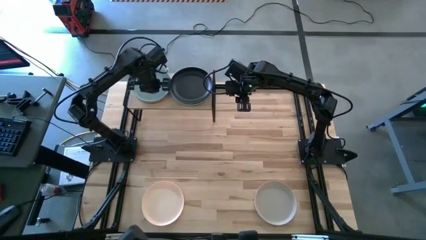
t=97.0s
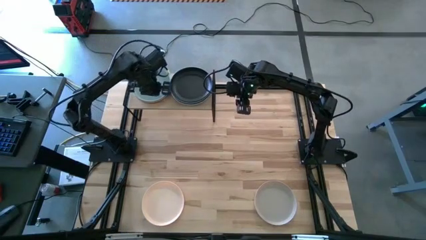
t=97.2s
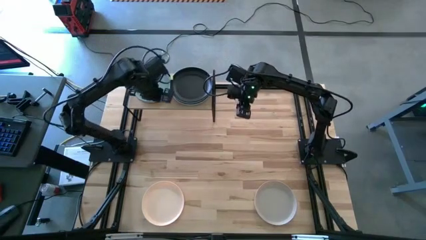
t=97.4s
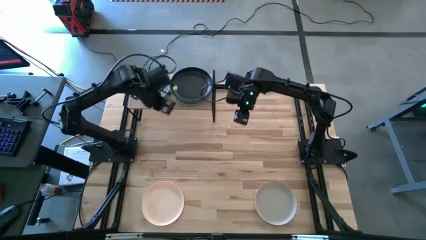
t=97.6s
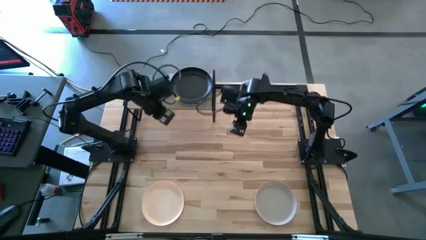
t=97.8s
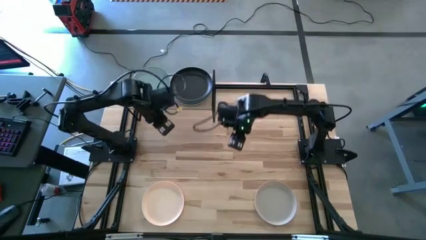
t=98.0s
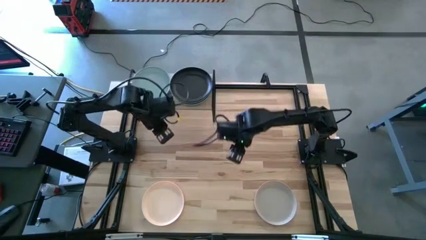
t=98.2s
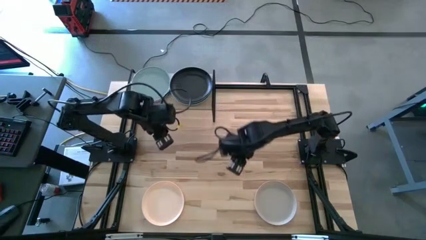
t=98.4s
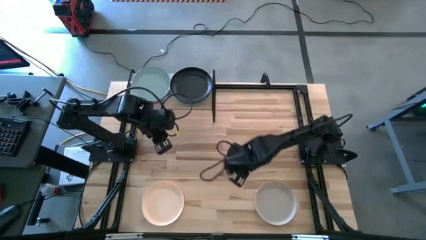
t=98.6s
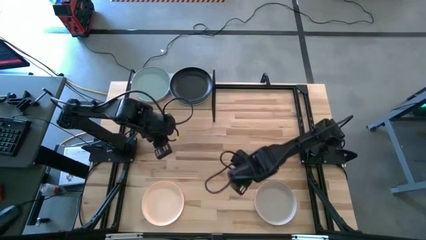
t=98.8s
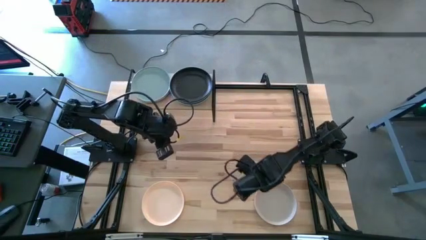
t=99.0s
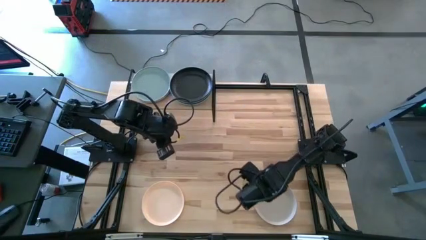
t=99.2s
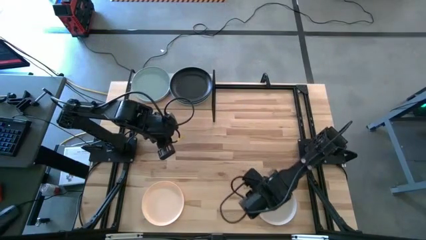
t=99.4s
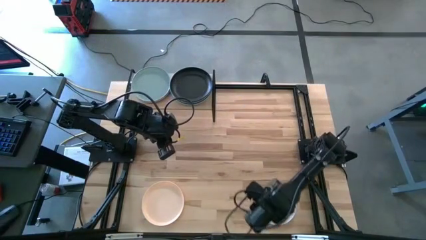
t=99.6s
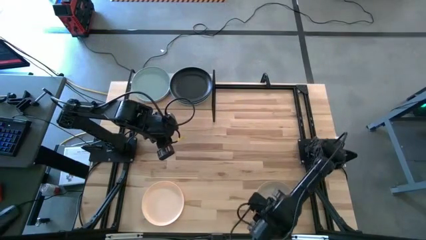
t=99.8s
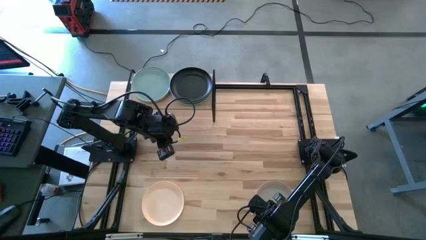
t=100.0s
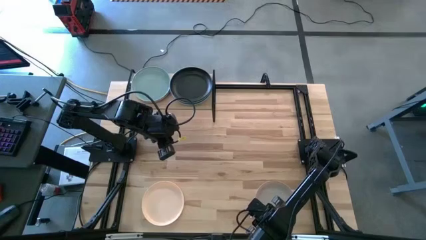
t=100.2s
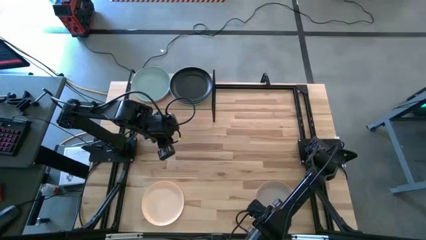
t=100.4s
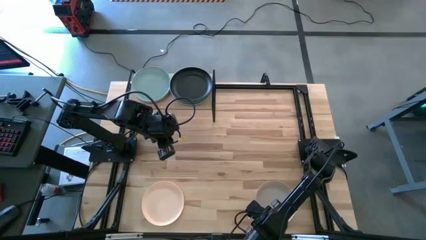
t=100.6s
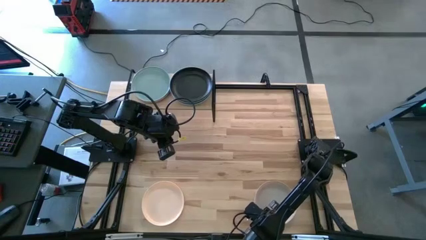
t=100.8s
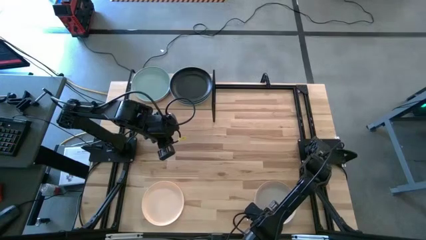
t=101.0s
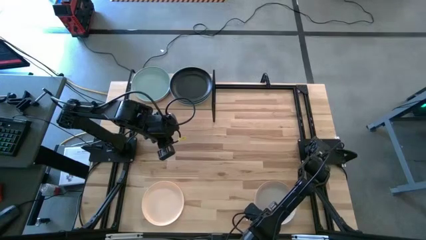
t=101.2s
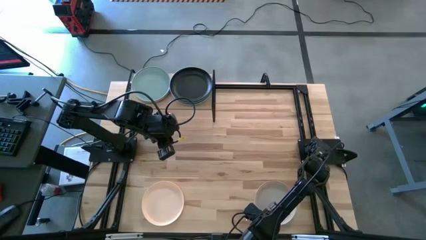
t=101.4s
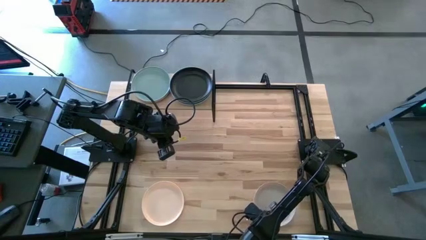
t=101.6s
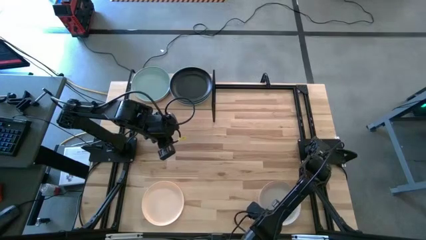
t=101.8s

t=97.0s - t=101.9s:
Task: Place and stack plates onto a shelf
Stack the gray plate on top of the light blue plate on the shelf

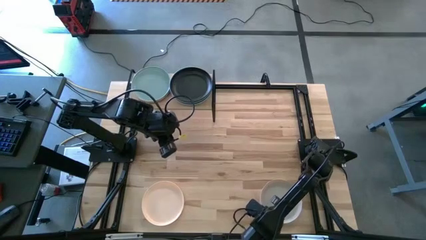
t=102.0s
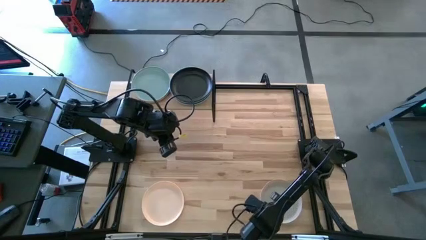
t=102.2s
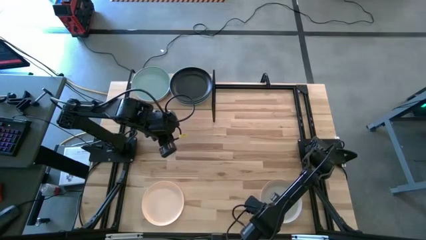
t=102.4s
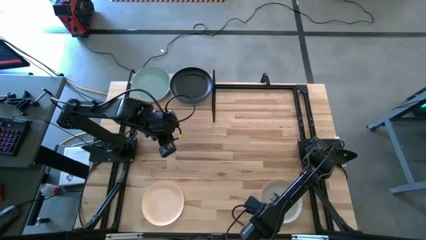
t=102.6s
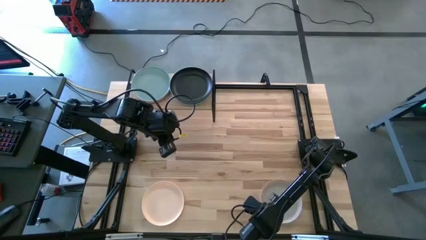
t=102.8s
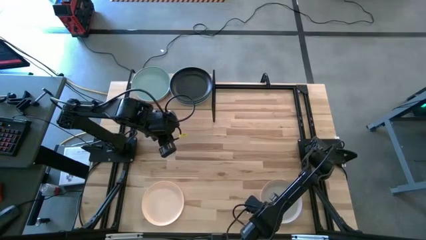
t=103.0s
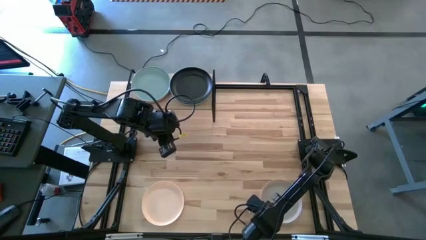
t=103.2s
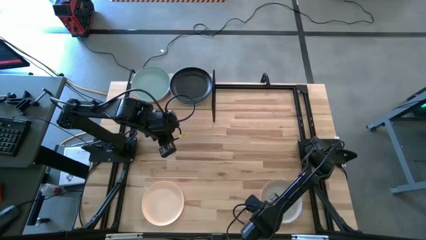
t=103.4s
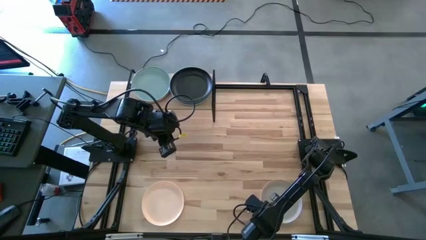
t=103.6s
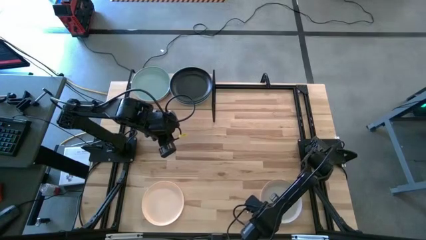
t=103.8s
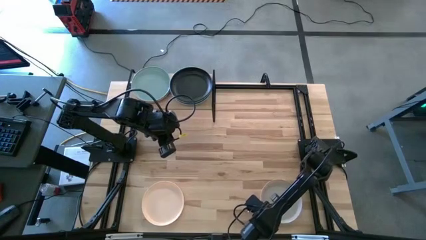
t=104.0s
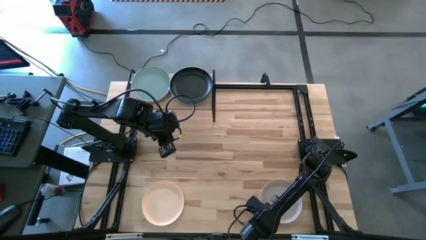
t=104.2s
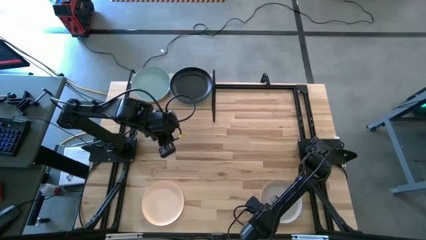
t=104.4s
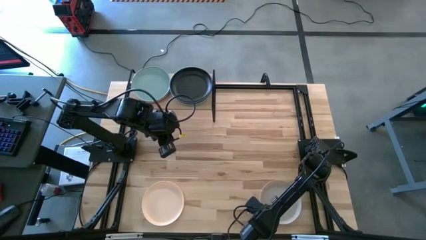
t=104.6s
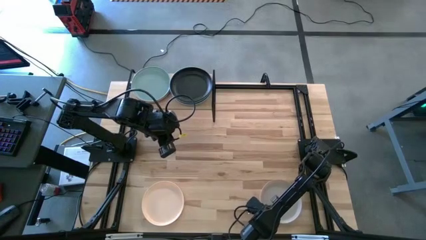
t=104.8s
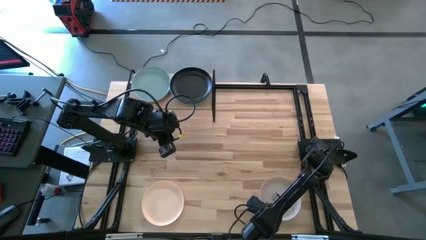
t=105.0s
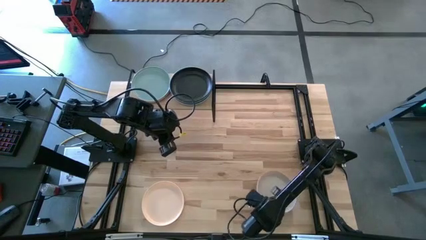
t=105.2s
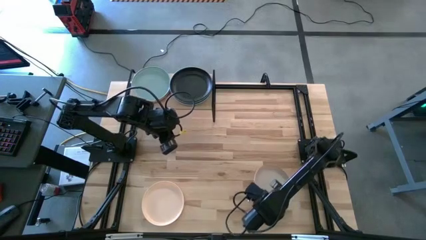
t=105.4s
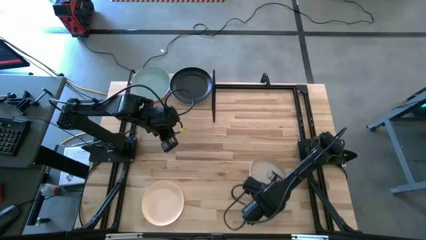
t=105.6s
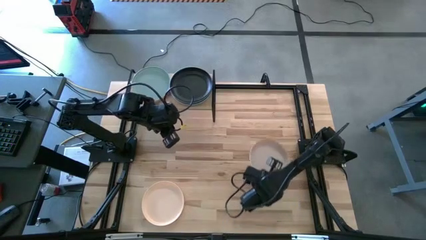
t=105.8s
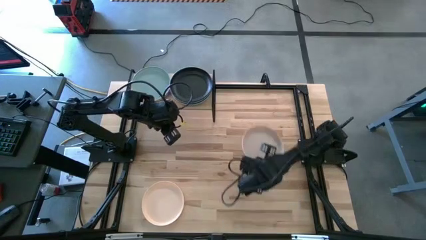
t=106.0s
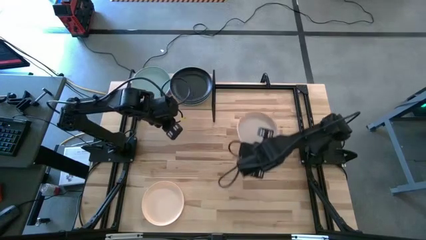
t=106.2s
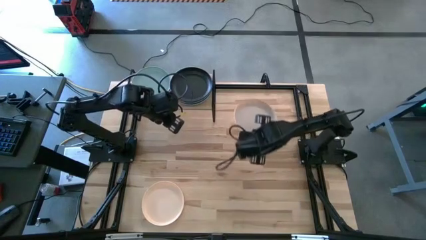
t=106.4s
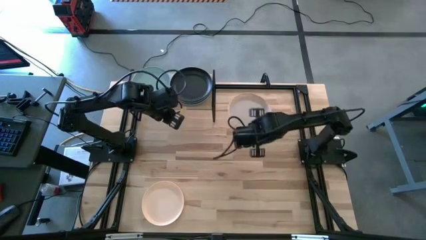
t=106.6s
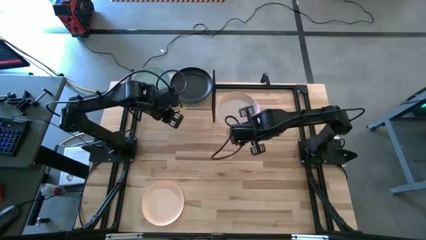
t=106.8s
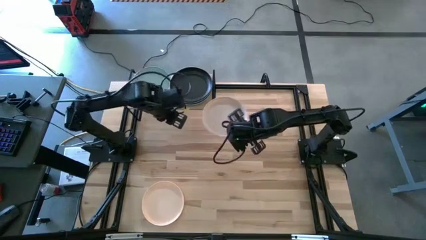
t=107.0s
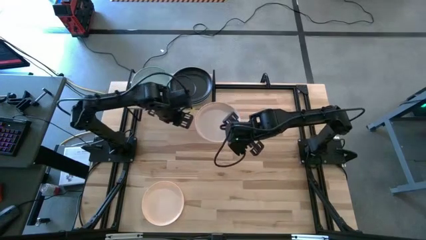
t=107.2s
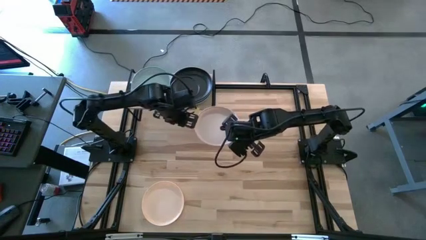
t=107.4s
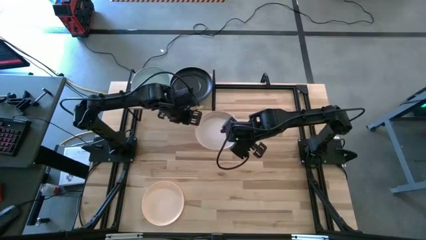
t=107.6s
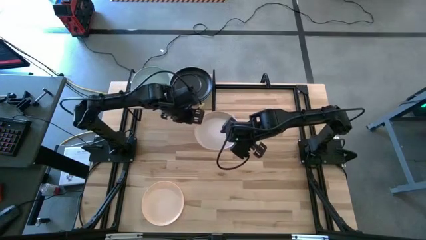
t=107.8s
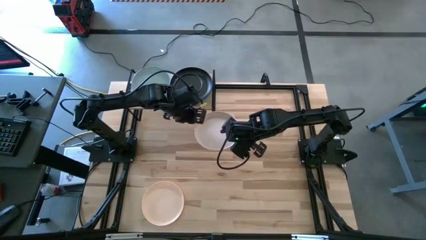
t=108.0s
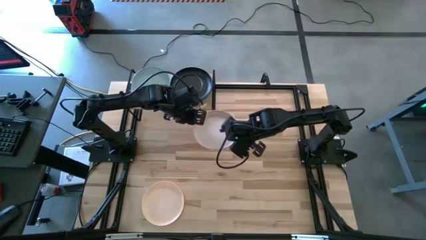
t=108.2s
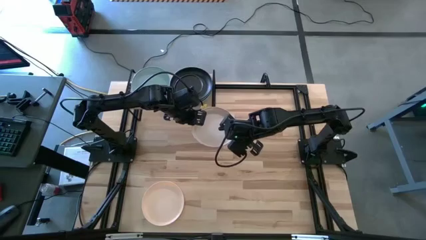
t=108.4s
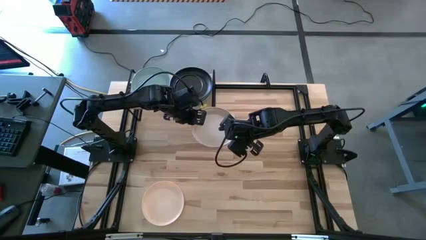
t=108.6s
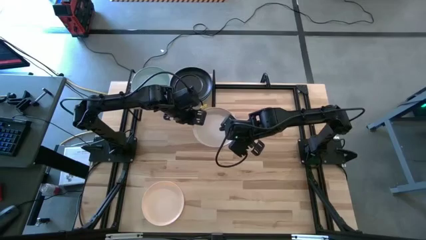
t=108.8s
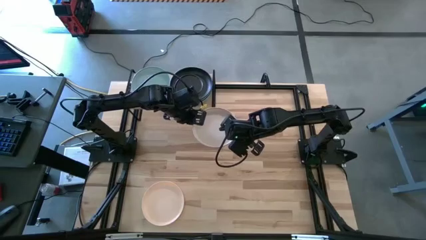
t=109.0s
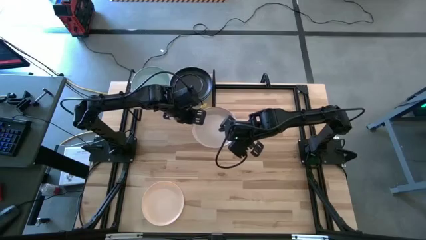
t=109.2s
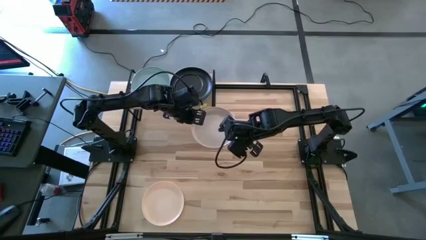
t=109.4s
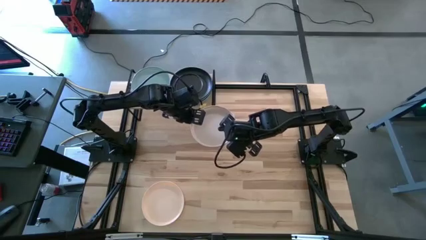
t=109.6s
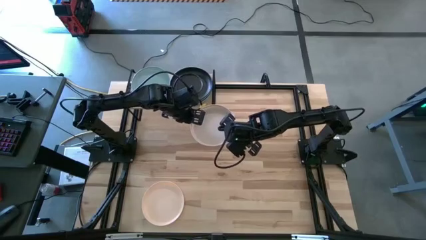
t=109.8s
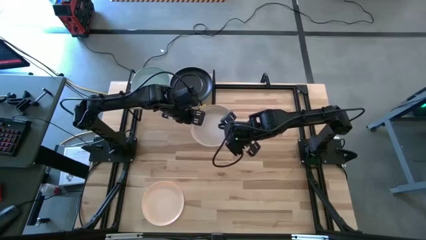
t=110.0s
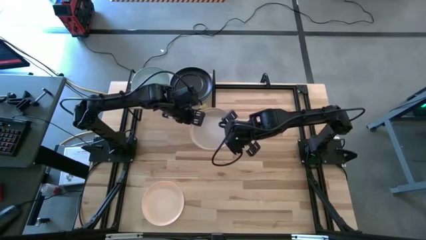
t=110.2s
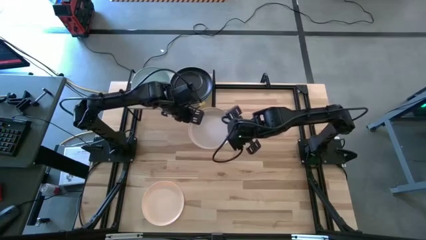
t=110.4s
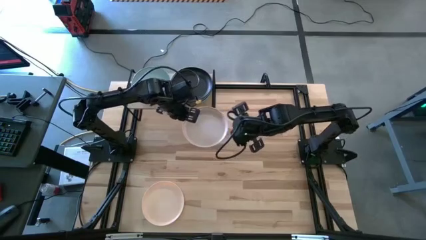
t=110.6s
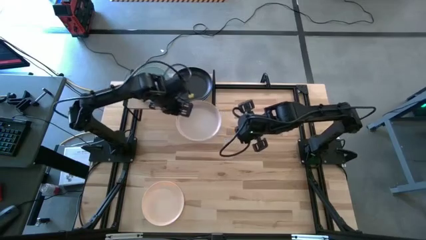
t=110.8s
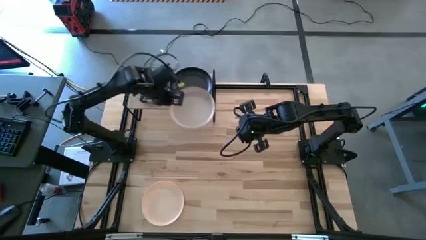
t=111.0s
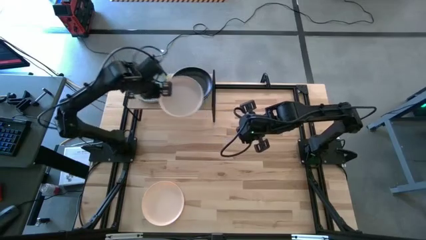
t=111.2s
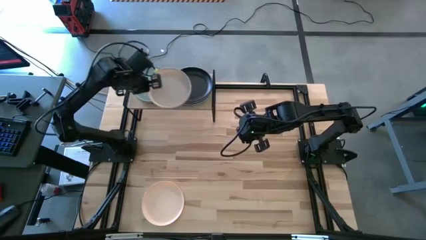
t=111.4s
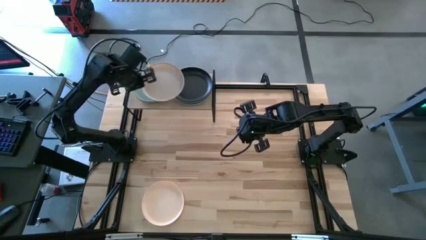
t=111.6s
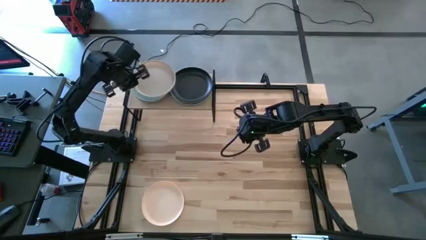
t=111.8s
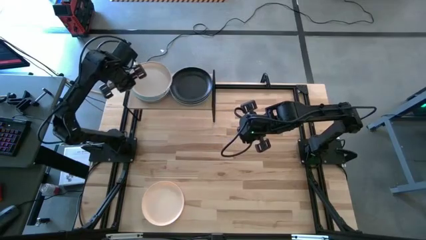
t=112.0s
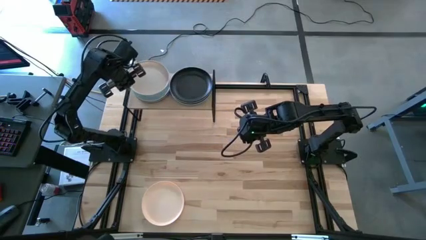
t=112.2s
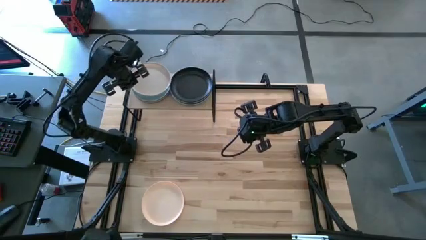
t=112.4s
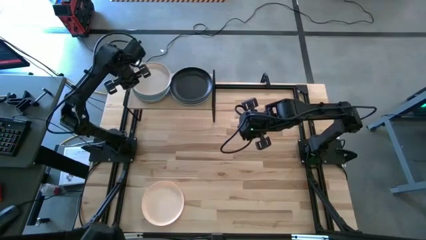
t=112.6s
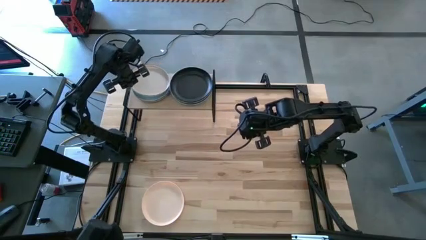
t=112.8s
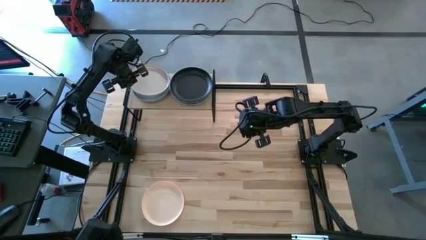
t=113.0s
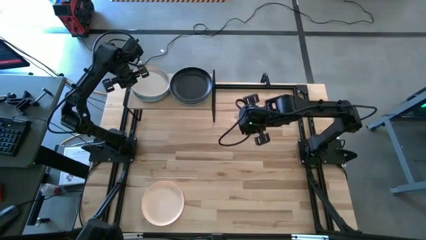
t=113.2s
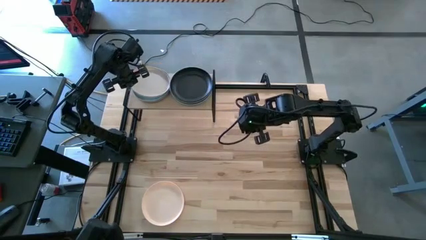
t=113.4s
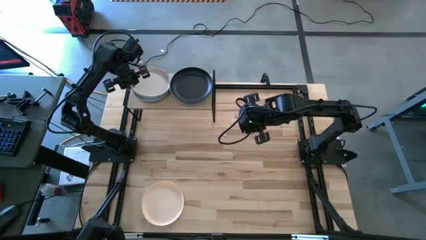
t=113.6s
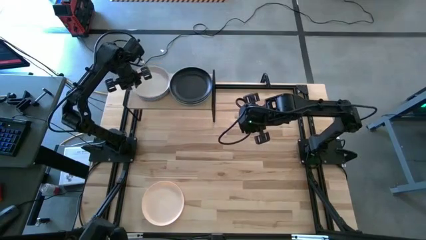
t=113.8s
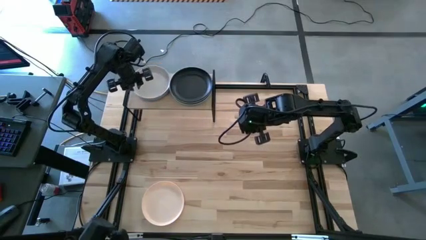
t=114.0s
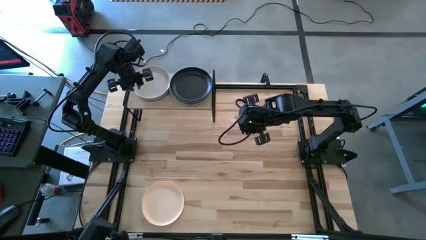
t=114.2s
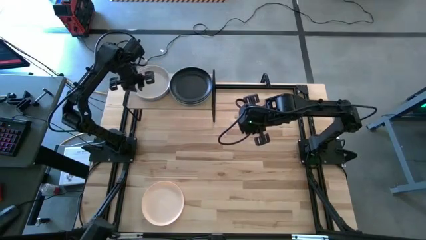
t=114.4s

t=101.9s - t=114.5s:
Stack the gray plate on top of the light blue plate on the shelf
